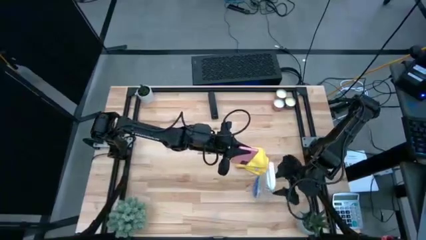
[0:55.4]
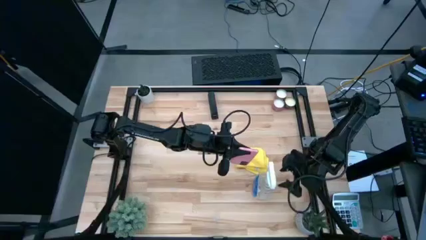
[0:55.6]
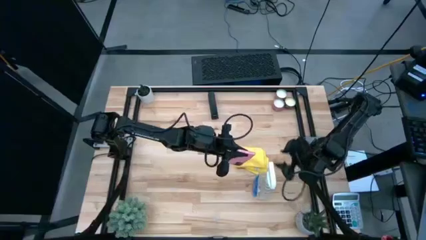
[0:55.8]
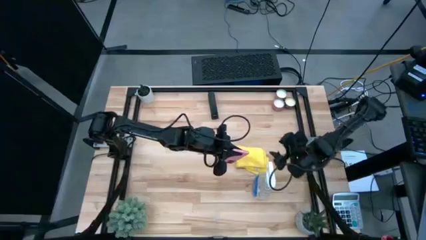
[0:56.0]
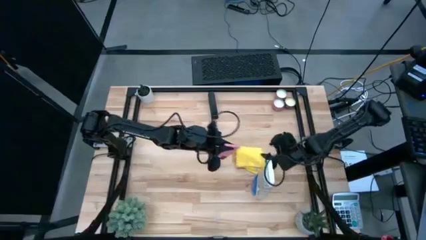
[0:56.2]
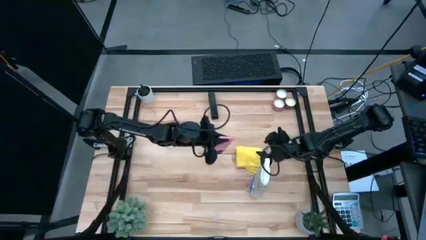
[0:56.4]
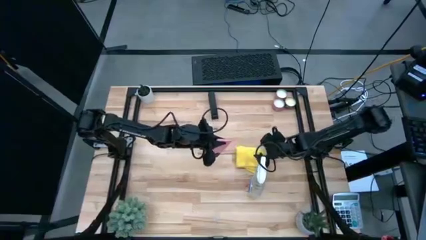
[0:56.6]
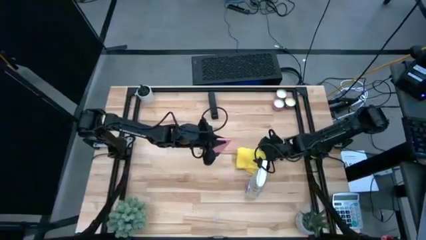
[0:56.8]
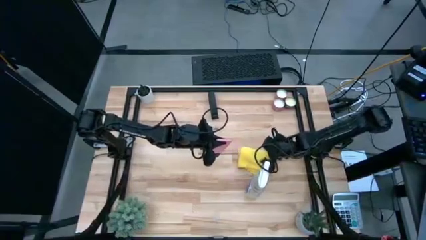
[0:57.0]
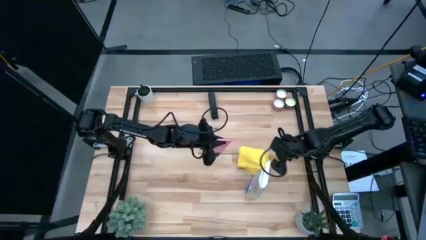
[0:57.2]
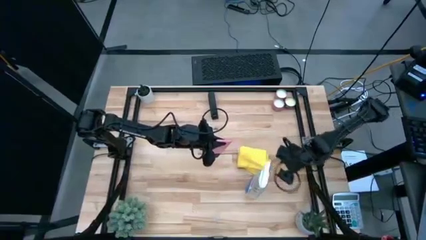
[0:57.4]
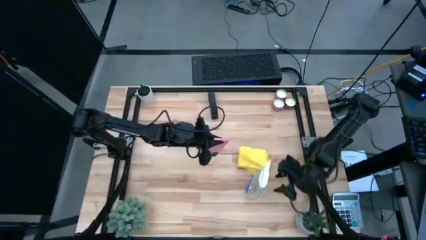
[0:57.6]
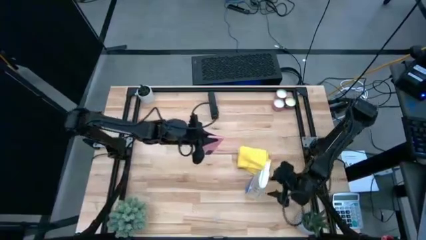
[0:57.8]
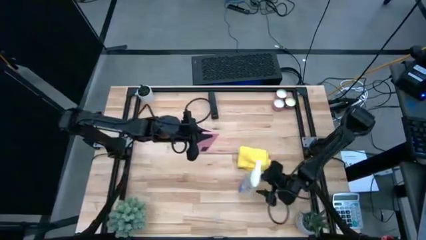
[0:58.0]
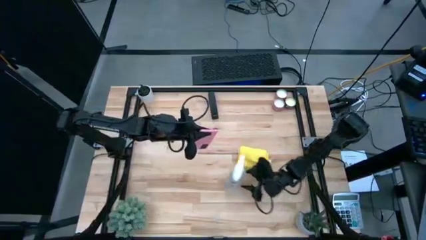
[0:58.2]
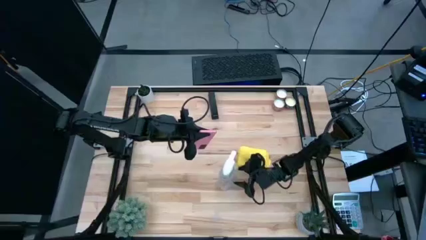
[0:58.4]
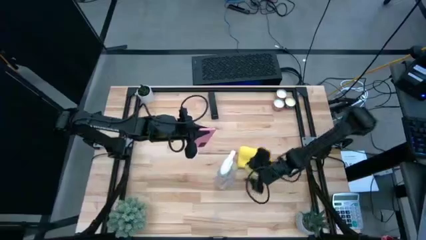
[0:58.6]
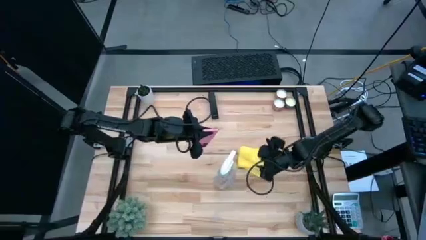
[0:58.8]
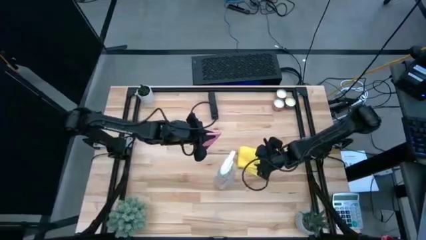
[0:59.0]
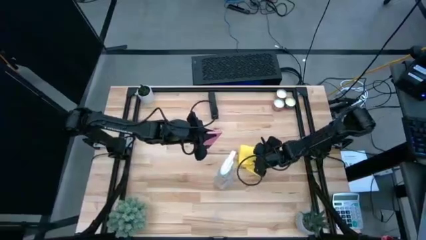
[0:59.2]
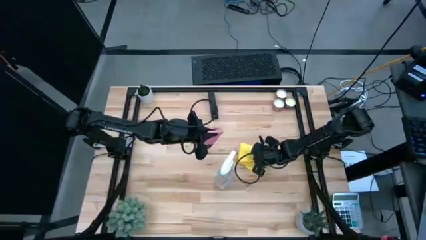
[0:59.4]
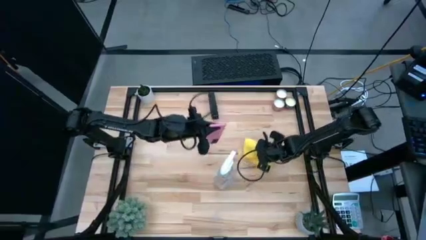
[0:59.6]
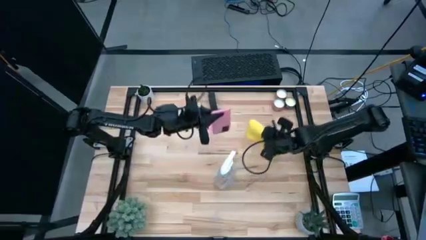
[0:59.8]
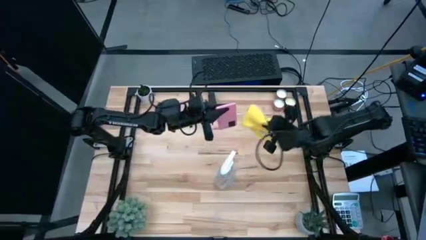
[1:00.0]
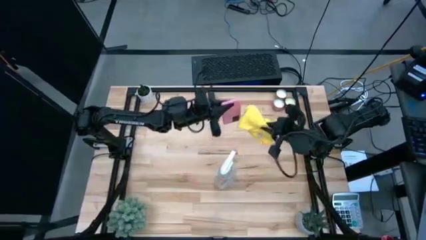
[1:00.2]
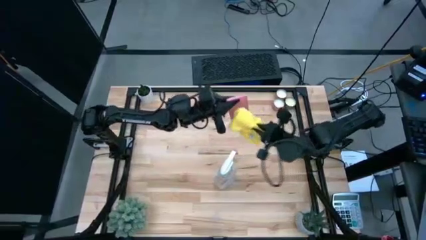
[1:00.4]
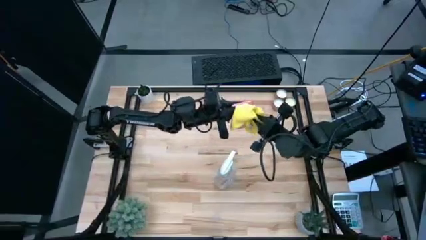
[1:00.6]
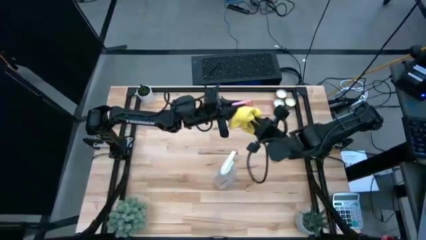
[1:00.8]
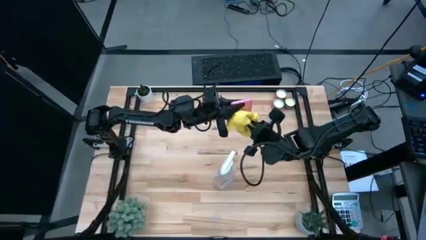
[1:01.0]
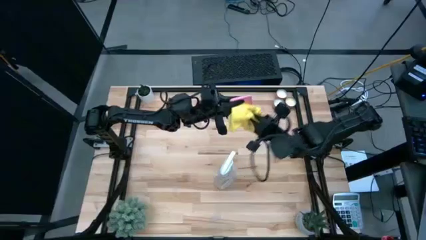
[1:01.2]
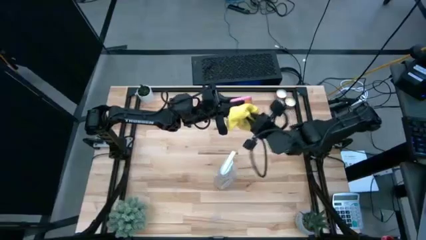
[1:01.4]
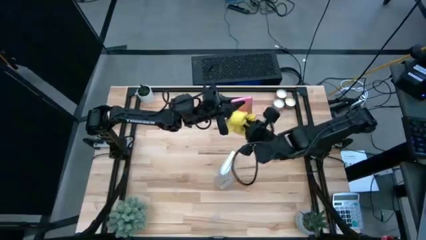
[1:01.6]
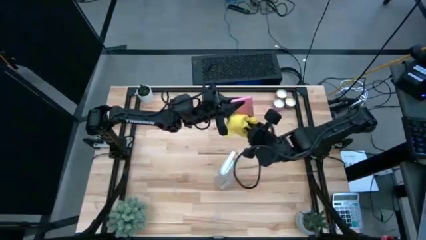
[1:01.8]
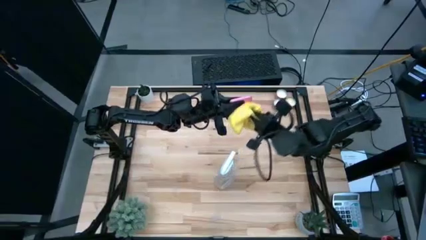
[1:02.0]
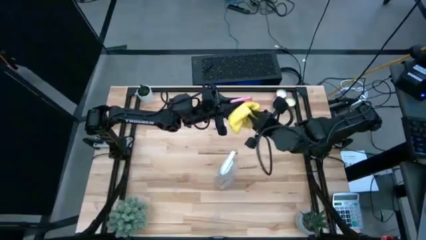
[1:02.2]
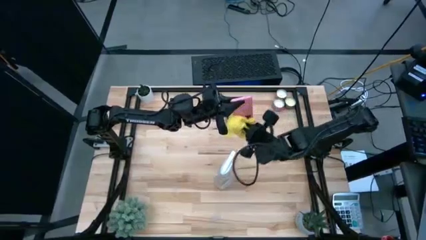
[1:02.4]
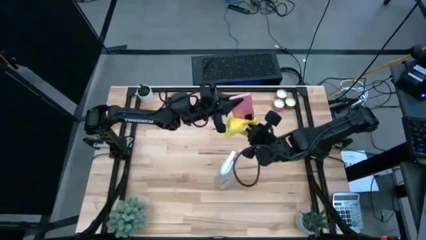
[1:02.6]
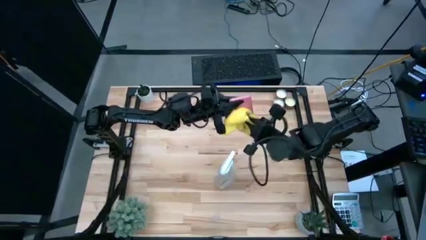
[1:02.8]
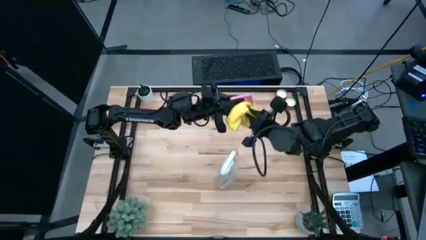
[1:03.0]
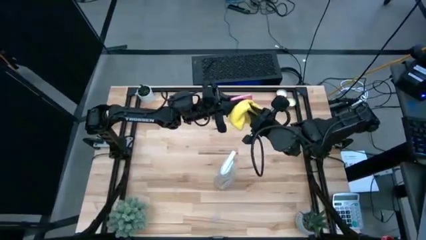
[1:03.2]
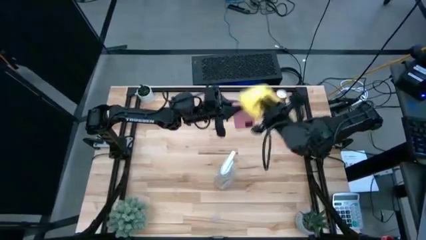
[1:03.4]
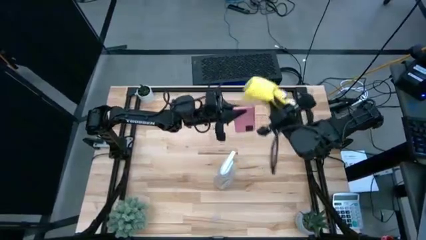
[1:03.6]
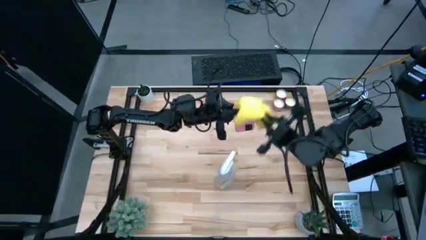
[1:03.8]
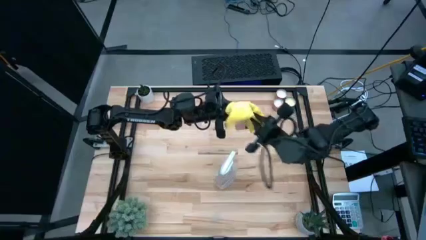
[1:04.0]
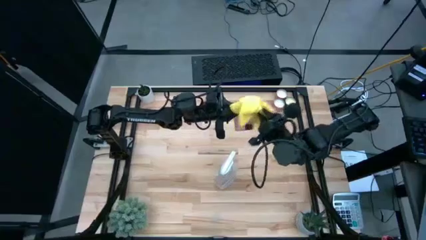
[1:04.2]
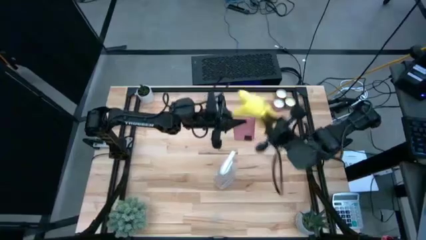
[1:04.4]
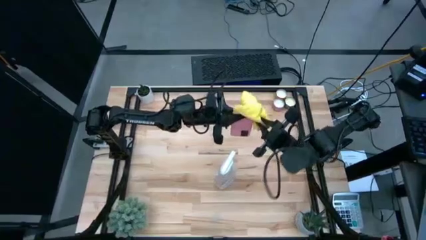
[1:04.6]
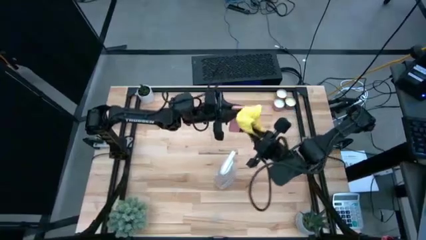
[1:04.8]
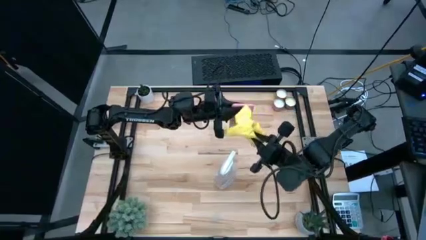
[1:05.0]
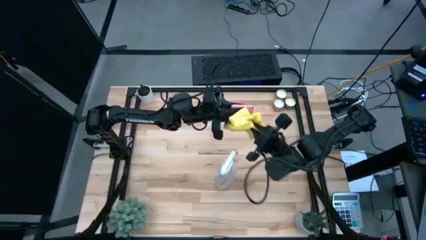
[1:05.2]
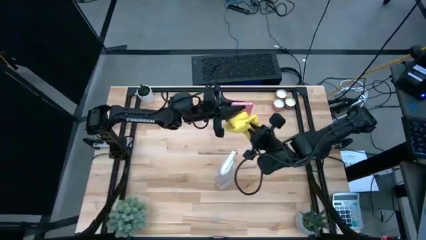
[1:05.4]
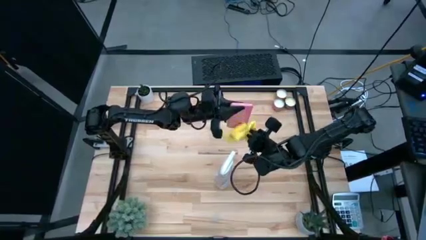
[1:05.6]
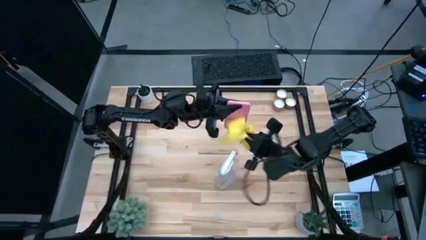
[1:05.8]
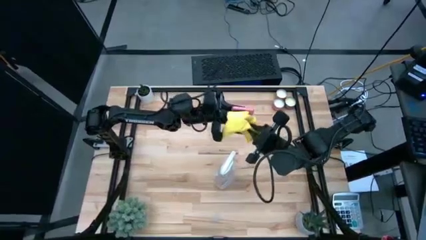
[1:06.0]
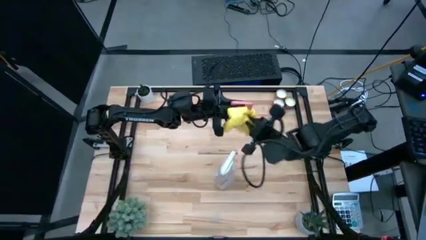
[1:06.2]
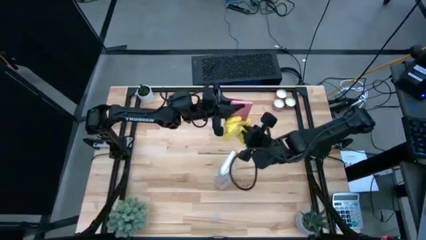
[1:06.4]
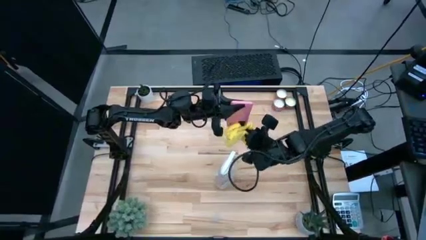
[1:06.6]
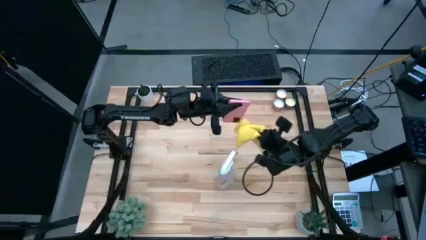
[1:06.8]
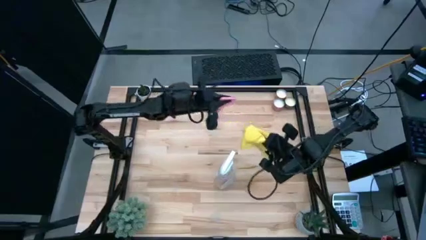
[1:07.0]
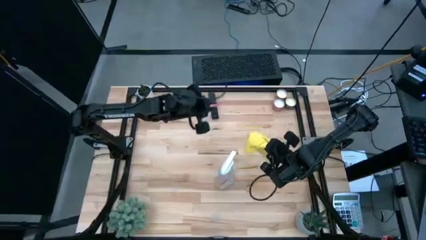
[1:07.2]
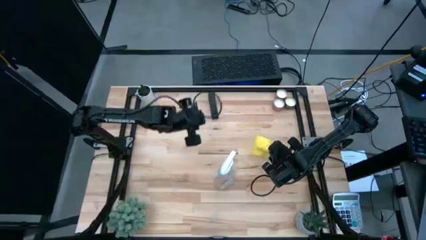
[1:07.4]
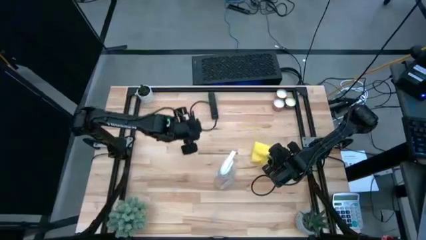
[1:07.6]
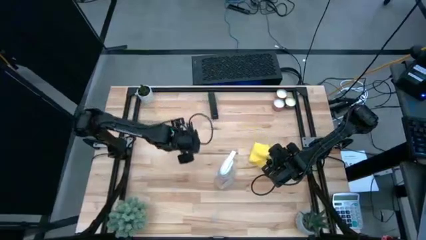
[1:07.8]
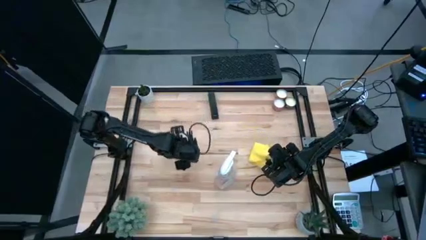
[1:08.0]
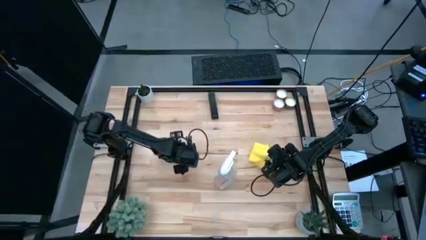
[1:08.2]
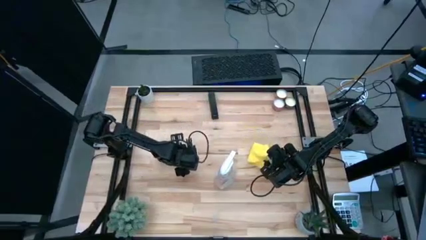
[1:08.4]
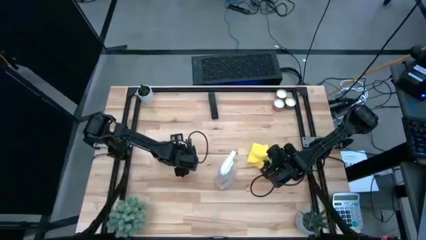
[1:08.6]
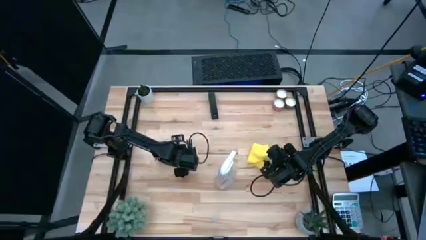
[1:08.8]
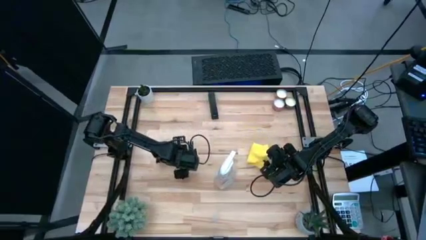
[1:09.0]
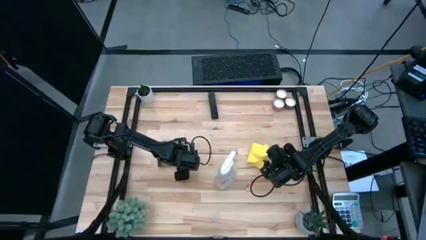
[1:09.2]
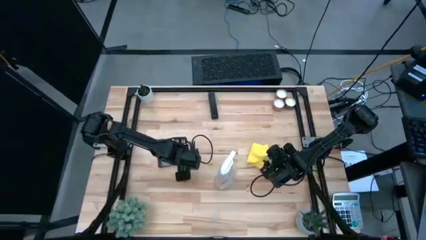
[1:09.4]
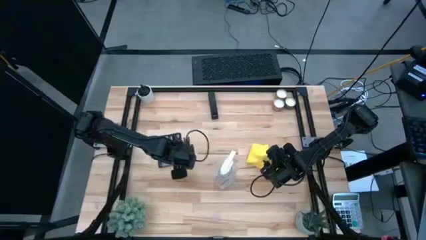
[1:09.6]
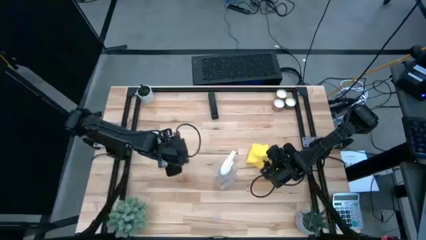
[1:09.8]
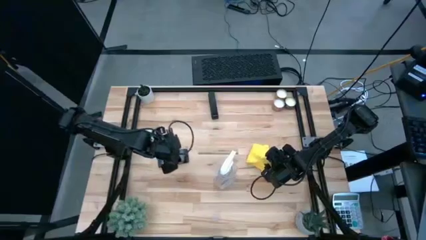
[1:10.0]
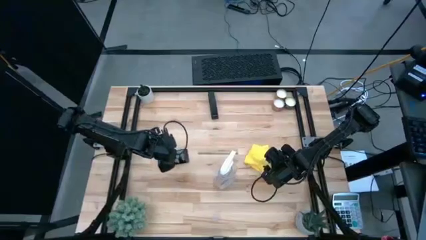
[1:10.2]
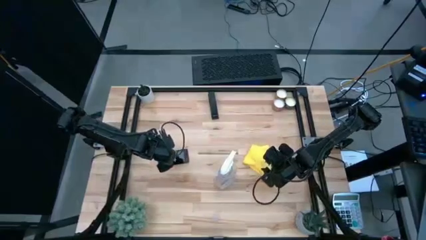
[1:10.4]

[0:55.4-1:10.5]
Task: Apply microfiber cloth
Wipe the cellphone with a yellow microfiber cloth

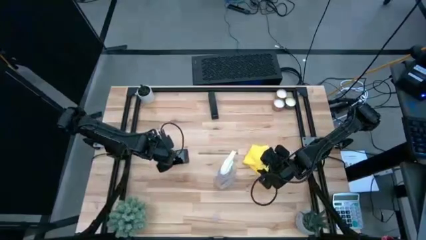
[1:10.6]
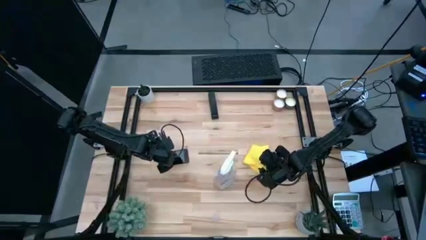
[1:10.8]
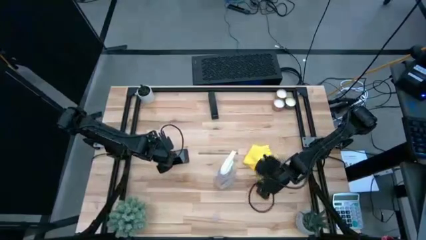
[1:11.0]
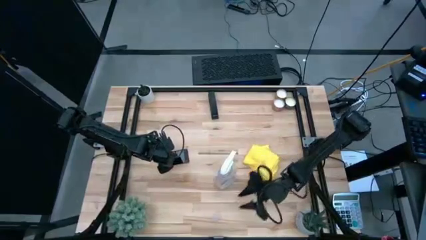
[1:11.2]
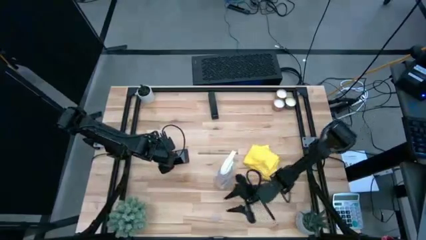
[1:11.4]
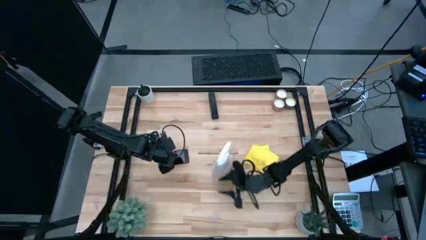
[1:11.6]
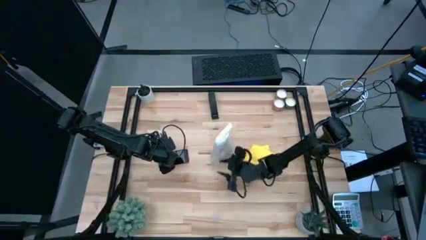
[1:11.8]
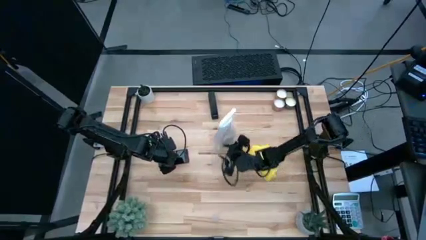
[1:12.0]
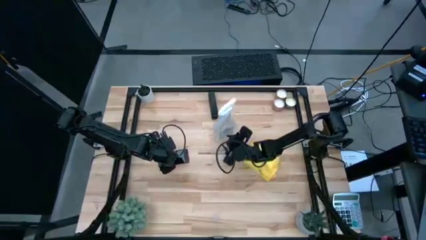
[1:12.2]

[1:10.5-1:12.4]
Adjust the spray bottle on the table
